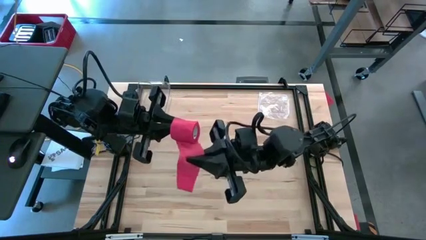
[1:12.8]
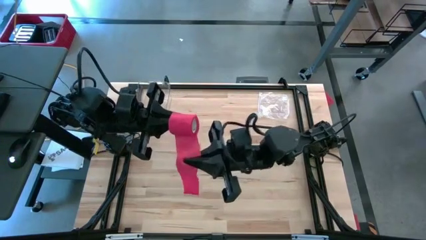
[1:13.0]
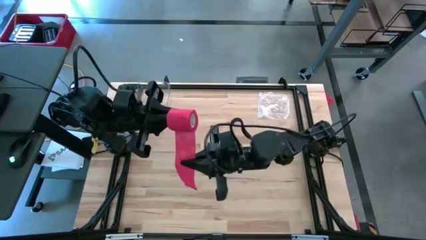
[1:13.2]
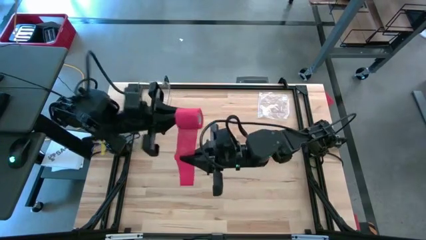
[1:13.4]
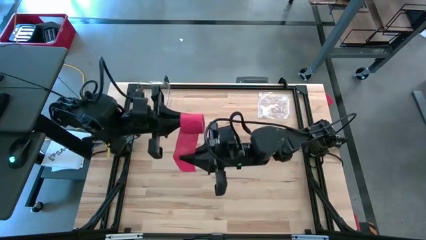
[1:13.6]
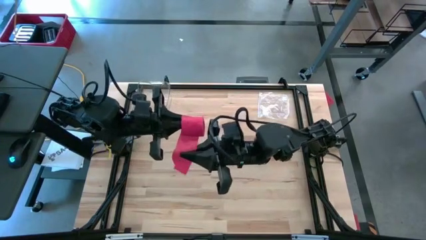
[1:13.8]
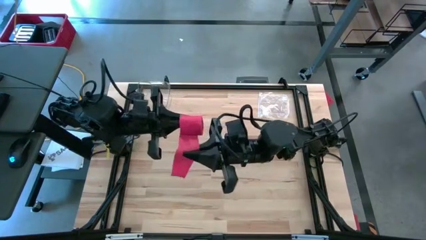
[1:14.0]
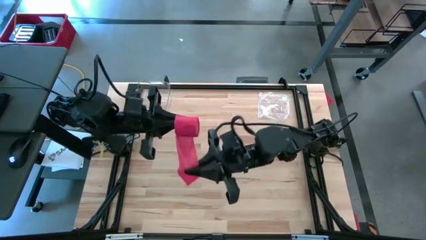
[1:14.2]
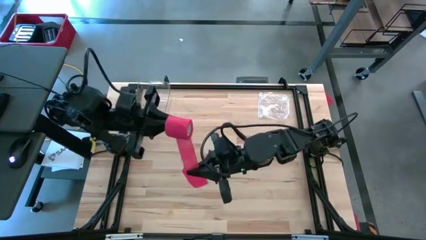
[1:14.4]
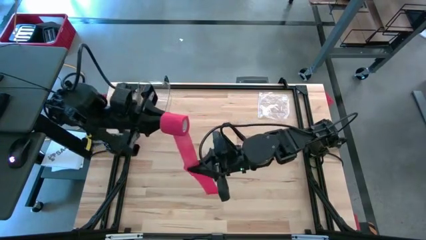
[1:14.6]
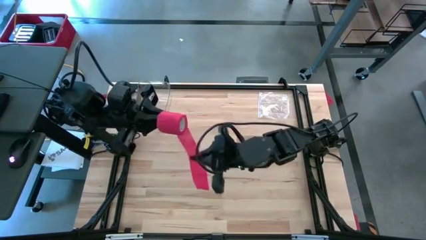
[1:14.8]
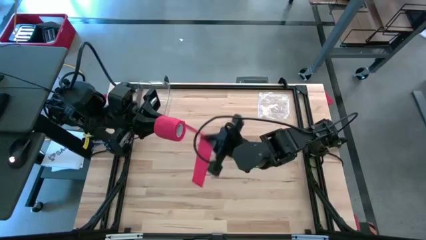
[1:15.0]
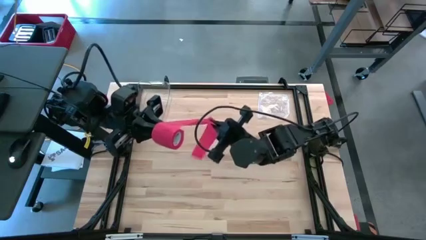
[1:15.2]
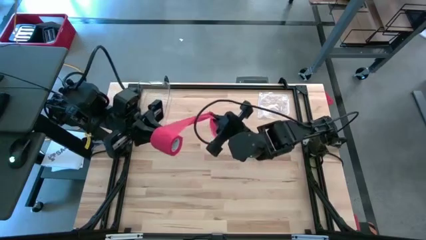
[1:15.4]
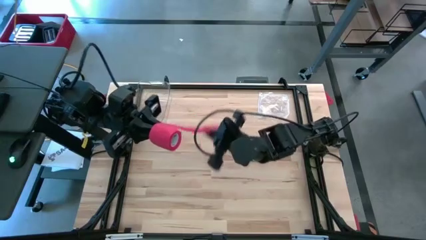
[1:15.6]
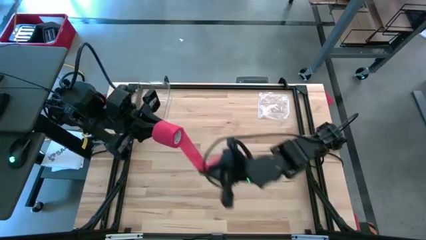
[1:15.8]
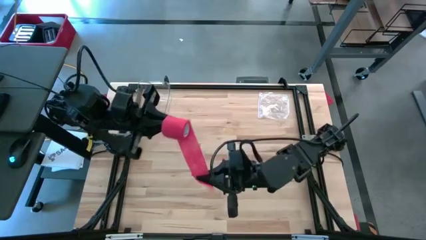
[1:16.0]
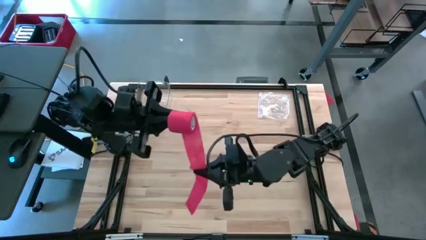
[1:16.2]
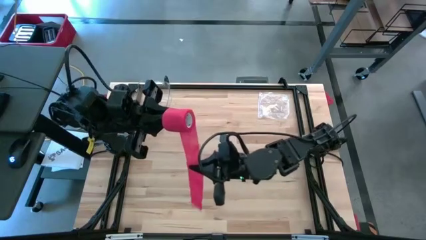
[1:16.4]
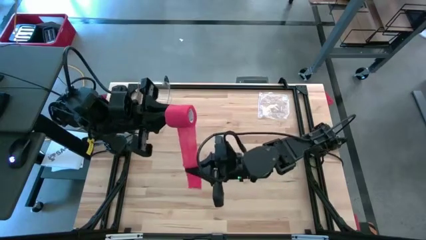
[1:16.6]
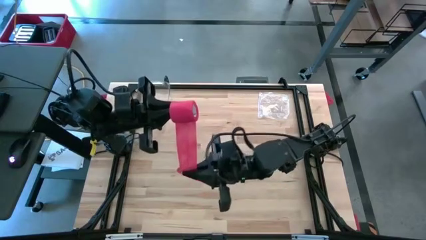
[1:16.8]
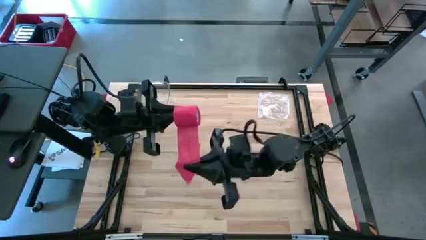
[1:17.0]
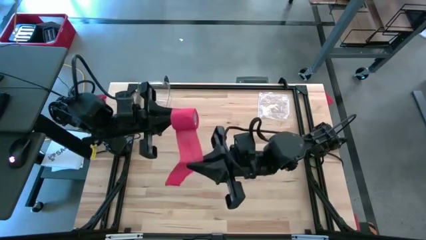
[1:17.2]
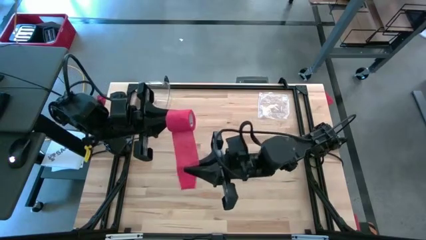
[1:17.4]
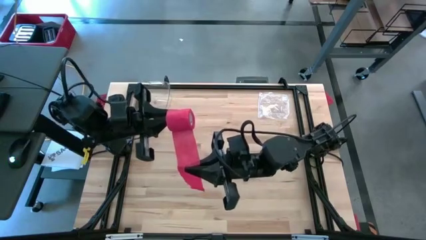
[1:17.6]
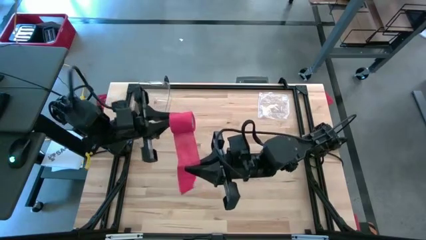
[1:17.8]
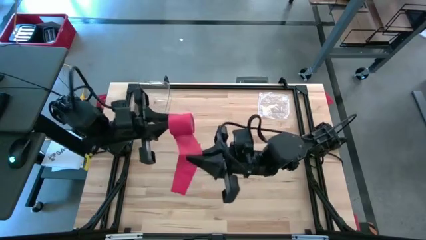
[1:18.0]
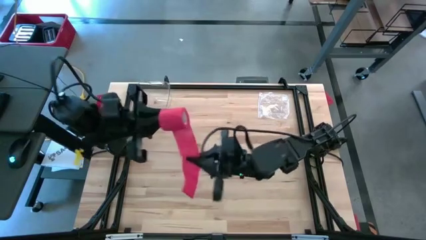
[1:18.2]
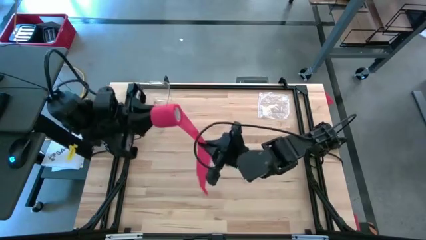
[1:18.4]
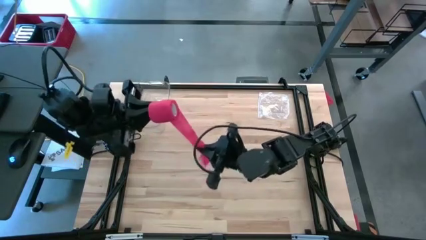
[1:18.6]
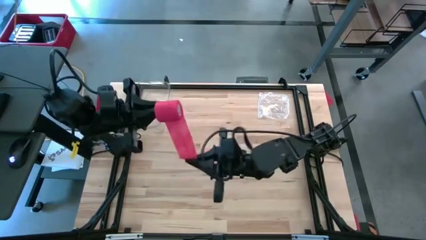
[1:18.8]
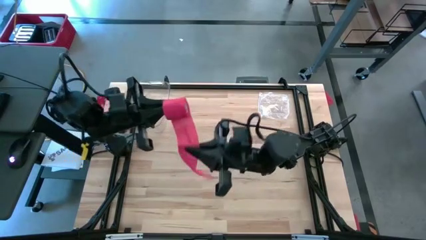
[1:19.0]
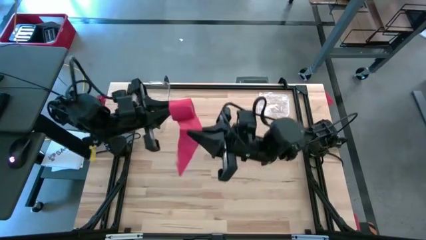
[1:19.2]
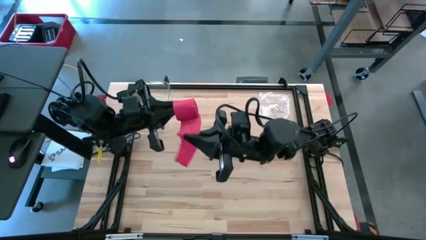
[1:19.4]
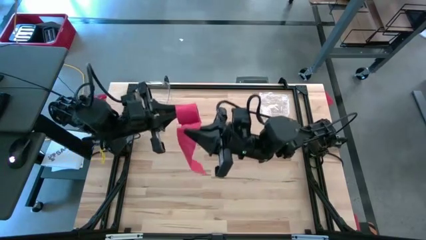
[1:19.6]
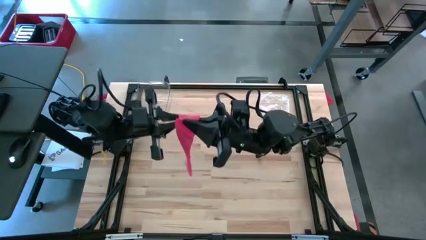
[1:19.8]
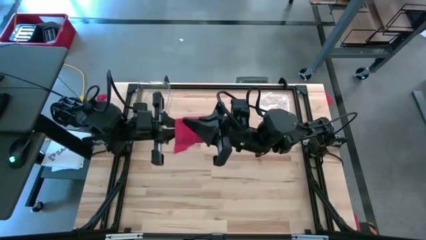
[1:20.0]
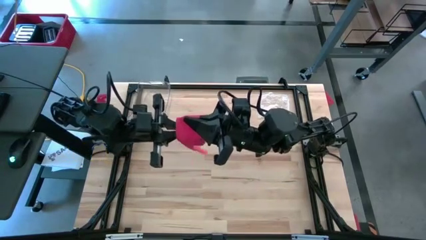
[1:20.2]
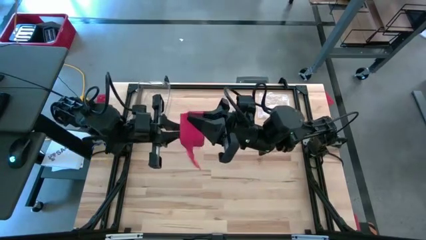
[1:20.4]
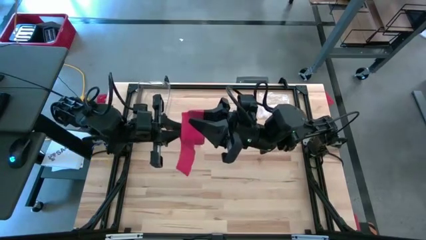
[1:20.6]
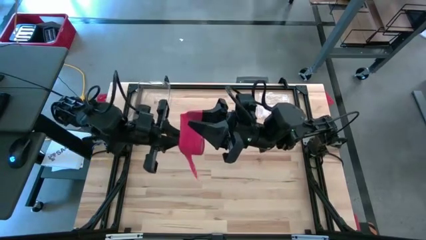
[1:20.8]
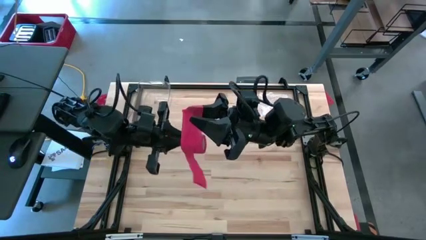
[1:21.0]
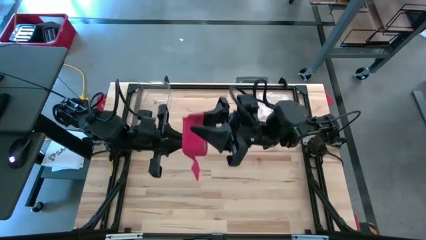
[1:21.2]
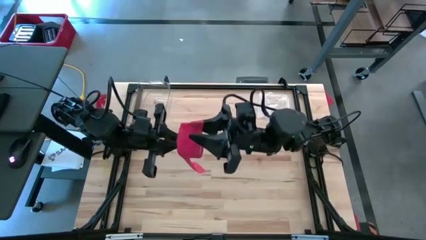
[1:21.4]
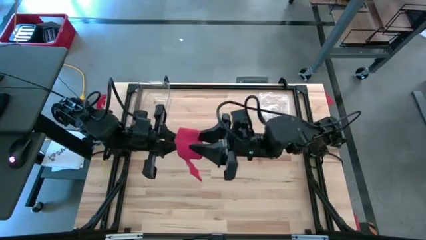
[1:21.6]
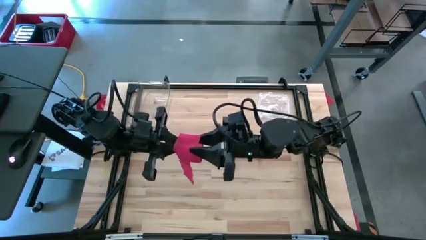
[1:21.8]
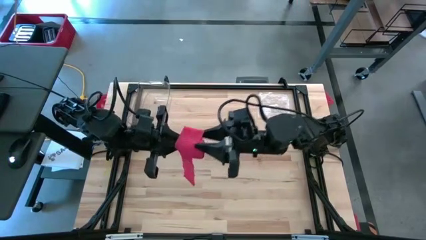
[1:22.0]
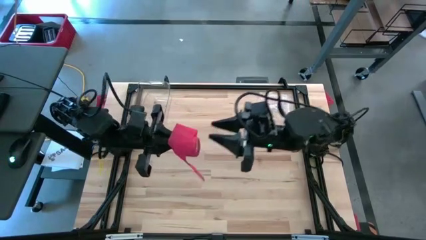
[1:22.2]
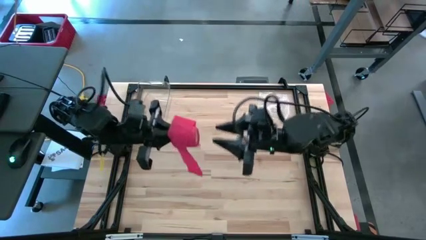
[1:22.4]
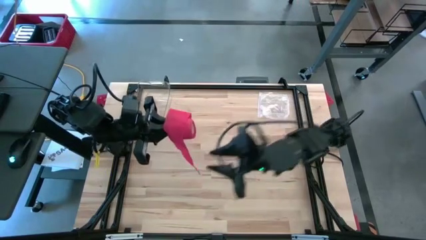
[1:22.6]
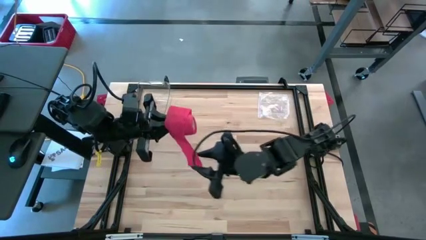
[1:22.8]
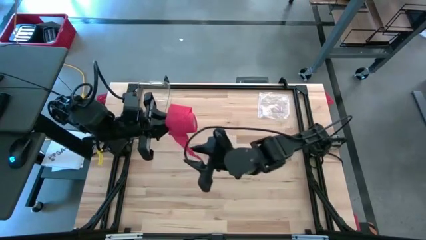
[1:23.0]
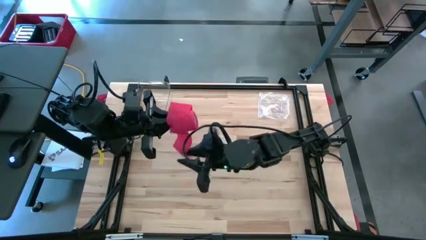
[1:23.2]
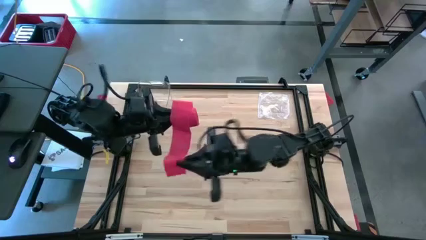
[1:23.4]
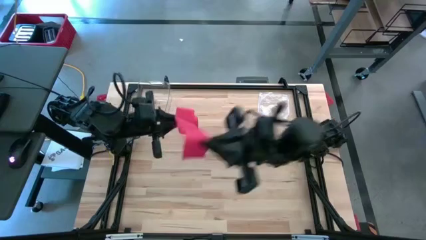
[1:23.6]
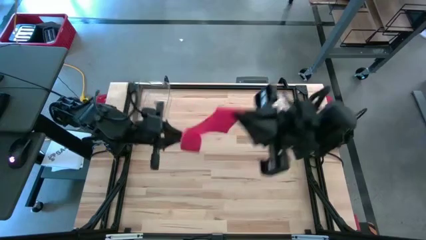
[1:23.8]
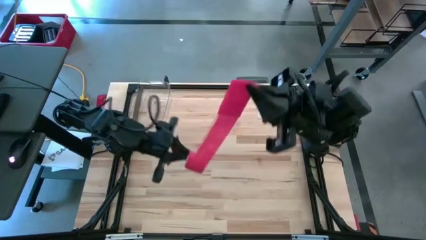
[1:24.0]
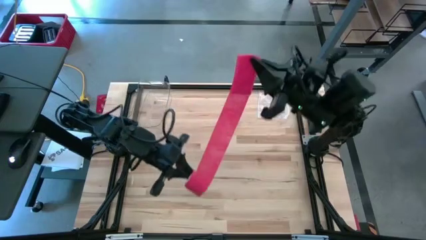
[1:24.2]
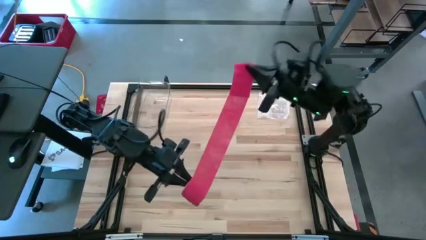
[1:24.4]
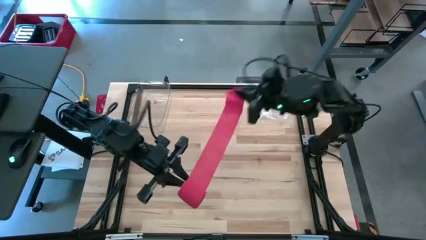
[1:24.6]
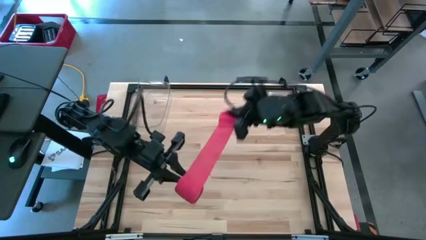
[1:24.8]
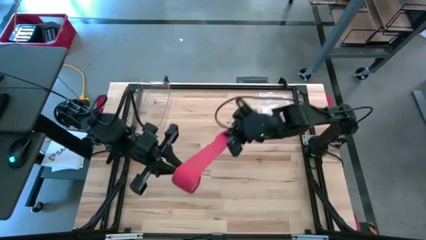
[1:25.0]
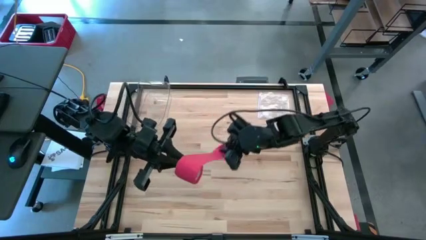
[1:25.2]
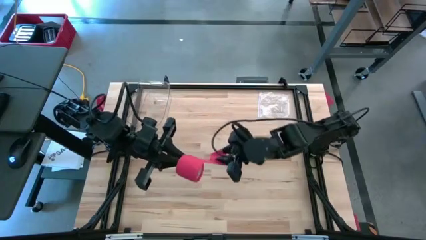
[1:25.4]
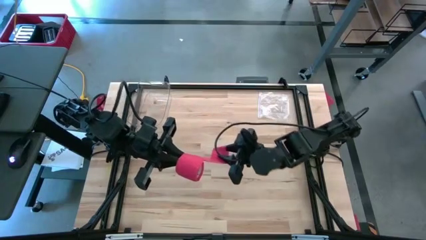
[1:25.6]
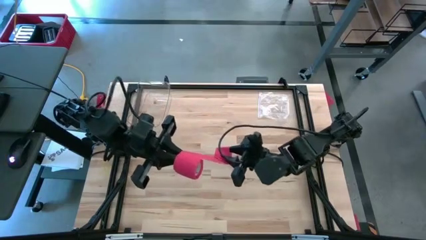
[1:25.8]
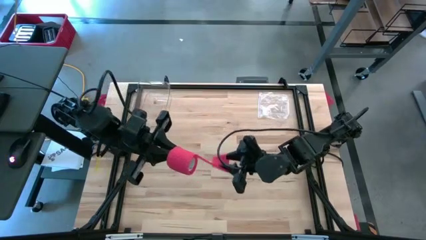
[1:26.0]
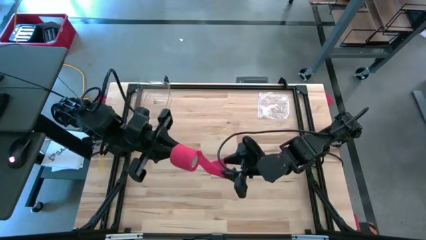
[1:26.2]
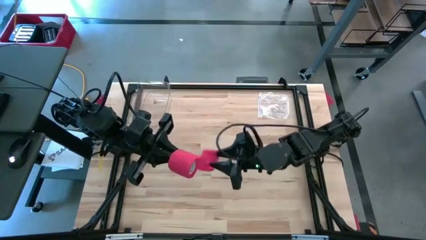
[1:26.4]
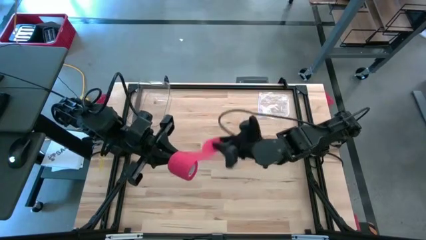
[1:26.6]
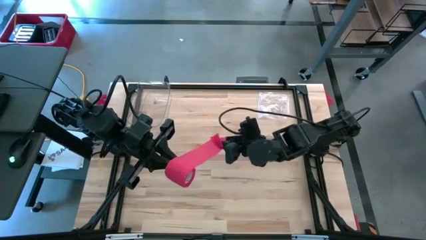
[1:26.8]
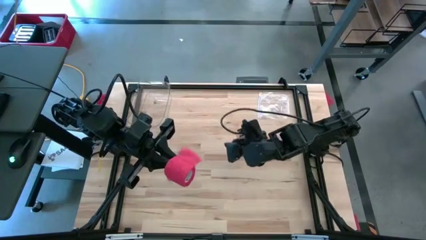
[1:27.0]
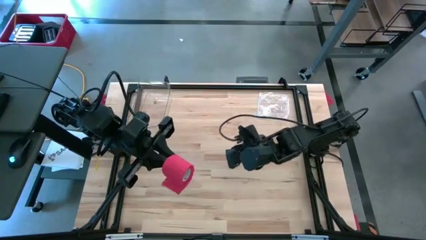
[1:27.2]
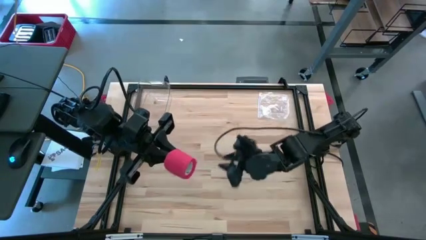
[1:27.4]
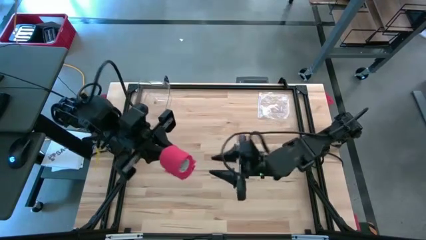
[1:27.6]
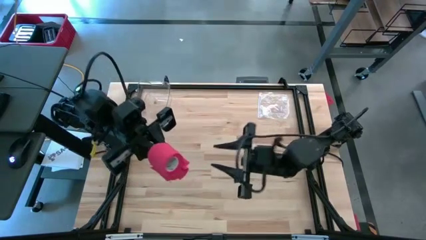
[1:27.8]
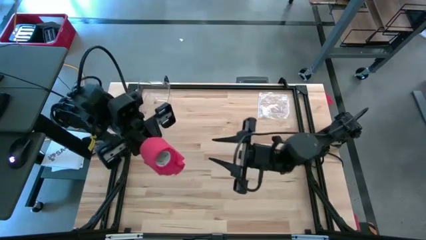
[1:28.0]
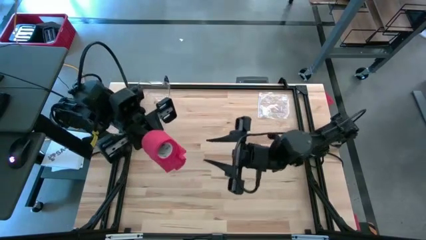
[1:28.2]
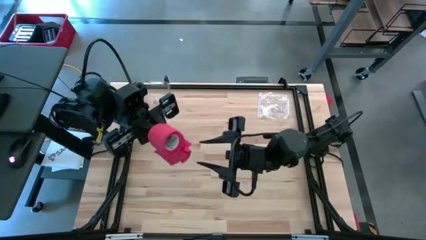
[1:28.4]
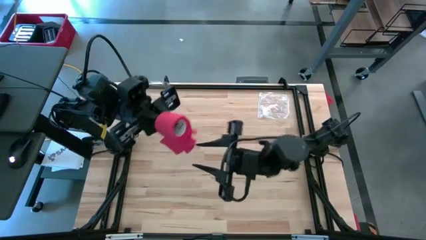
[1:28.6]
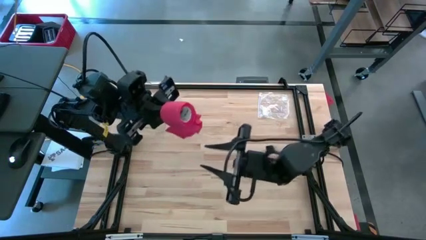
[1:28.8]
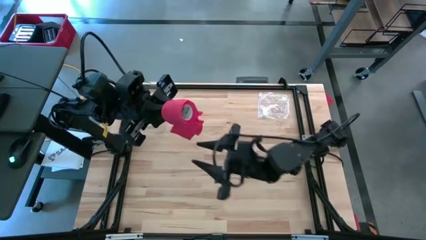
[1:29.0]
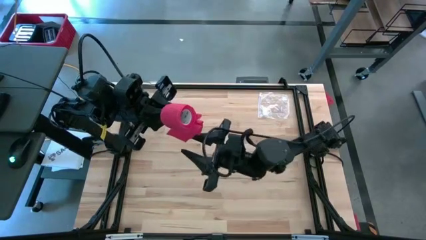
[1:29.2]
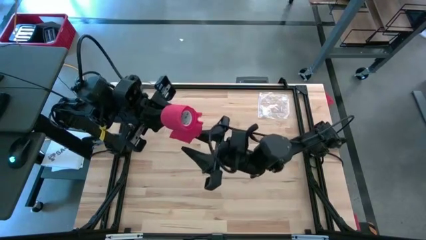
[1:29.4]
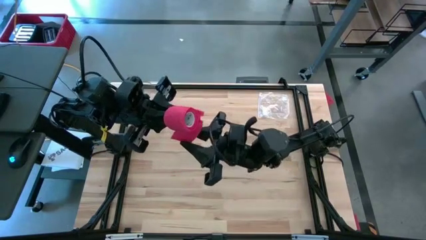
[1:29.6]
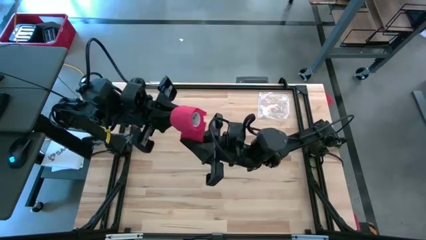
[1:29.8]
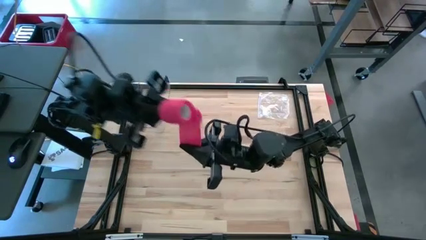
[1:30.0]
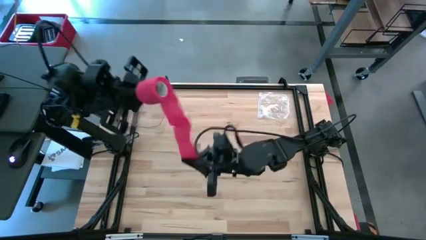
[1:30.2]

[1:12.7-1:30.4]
Task: Roll bandage
Roll the red bandage
